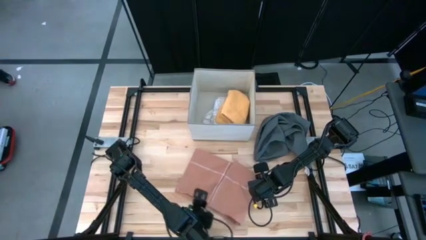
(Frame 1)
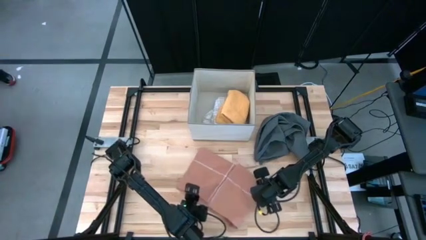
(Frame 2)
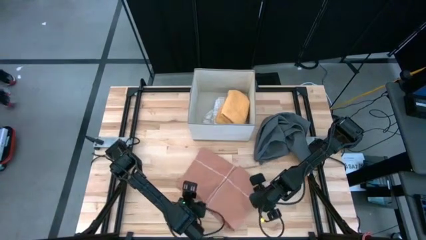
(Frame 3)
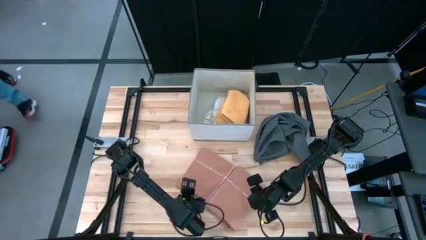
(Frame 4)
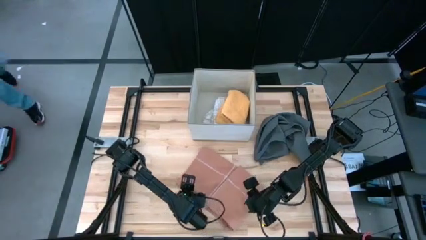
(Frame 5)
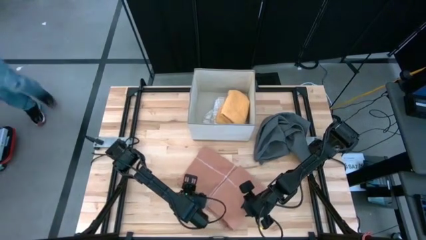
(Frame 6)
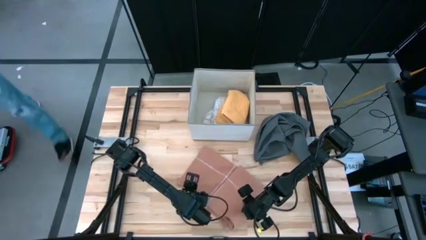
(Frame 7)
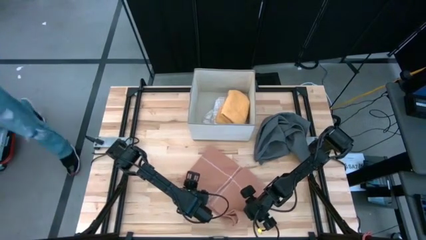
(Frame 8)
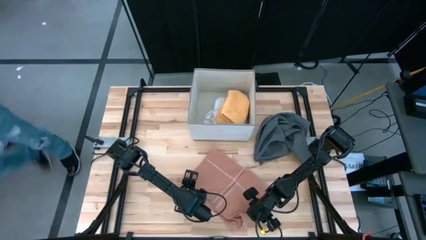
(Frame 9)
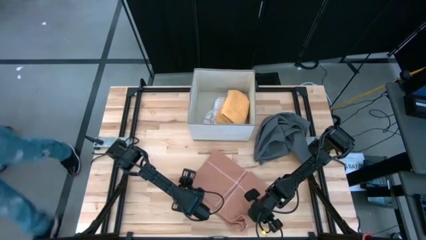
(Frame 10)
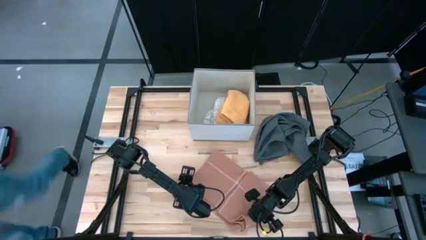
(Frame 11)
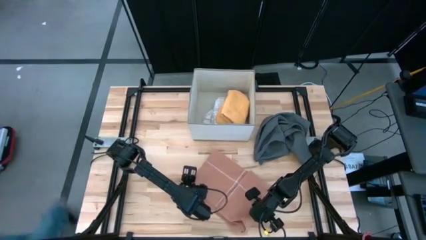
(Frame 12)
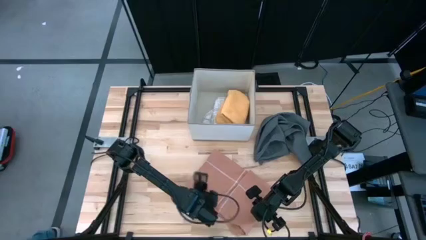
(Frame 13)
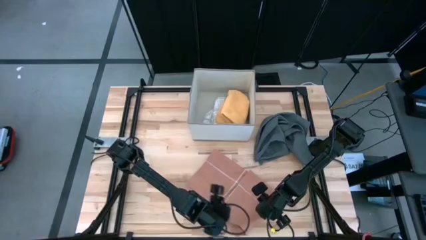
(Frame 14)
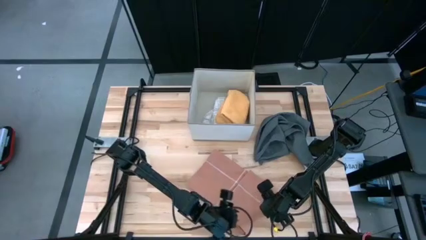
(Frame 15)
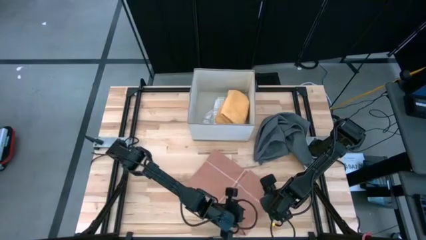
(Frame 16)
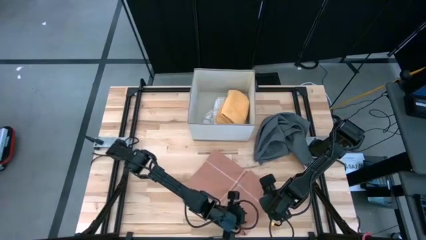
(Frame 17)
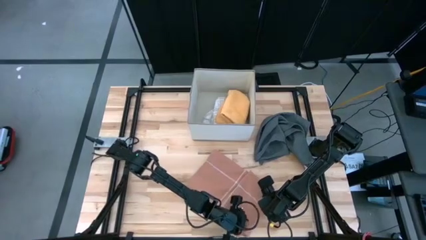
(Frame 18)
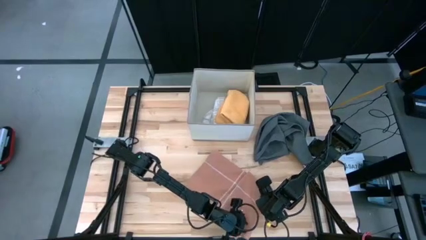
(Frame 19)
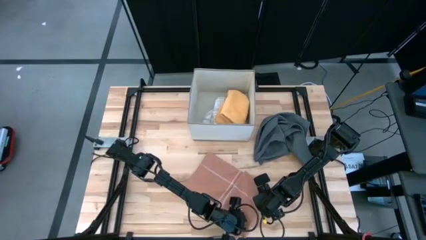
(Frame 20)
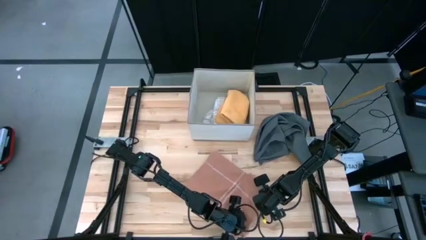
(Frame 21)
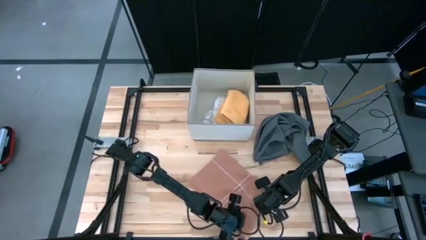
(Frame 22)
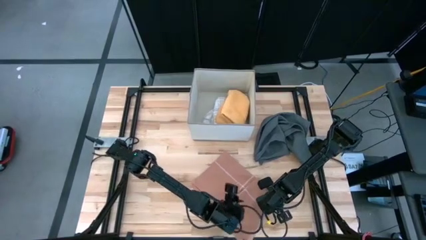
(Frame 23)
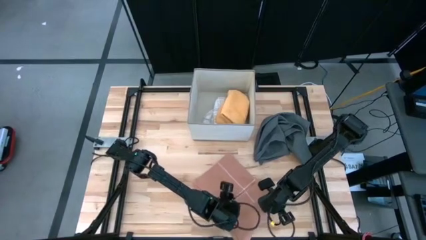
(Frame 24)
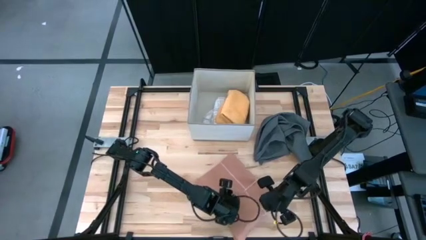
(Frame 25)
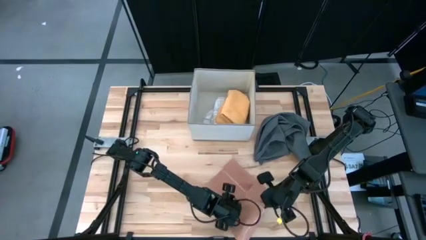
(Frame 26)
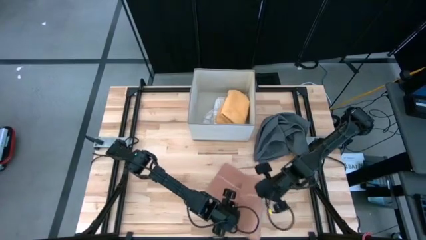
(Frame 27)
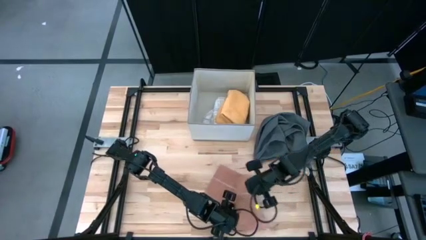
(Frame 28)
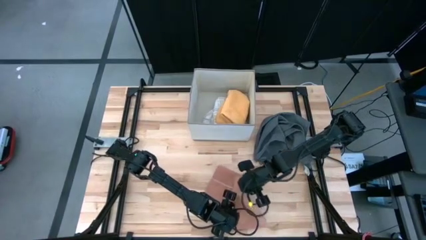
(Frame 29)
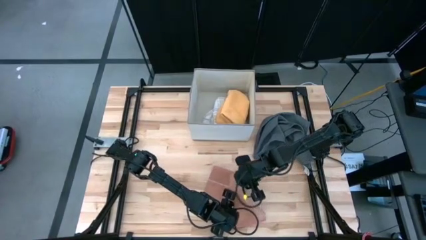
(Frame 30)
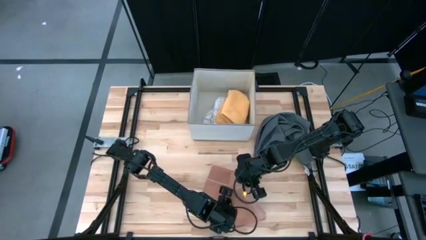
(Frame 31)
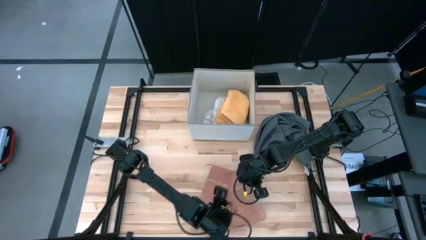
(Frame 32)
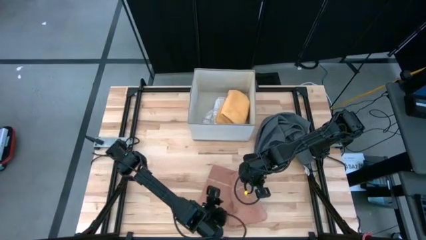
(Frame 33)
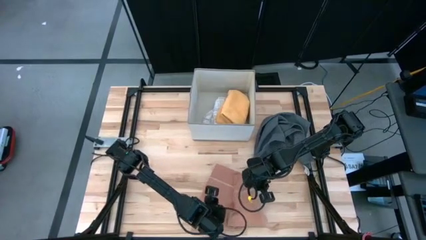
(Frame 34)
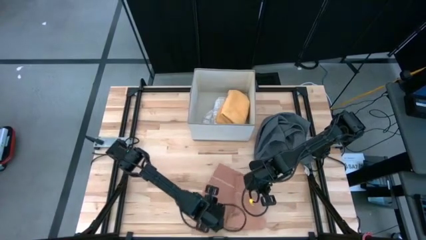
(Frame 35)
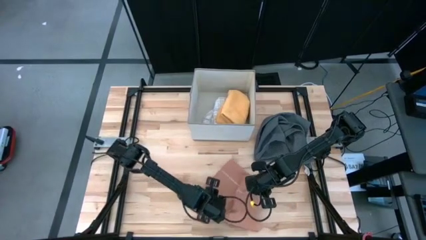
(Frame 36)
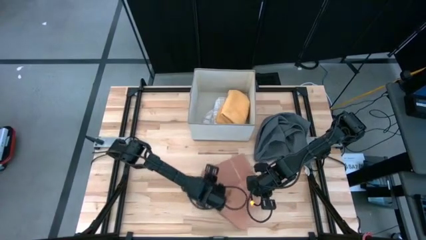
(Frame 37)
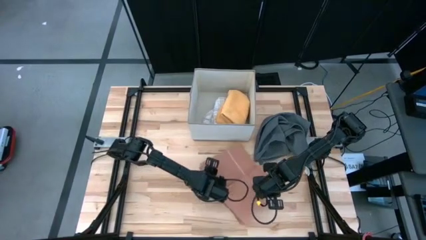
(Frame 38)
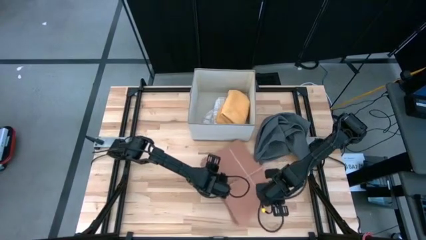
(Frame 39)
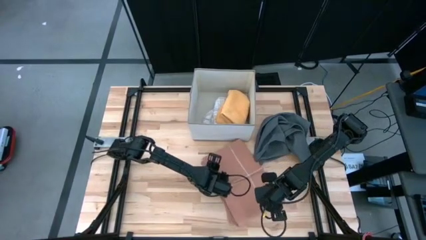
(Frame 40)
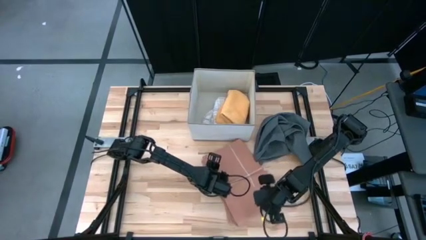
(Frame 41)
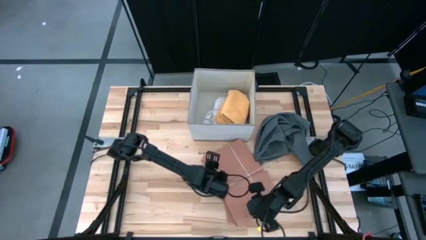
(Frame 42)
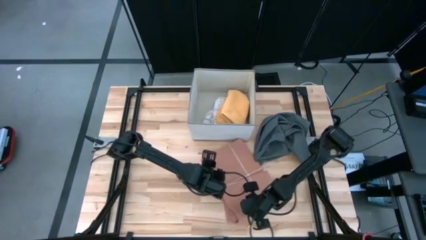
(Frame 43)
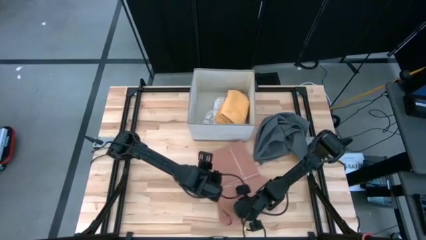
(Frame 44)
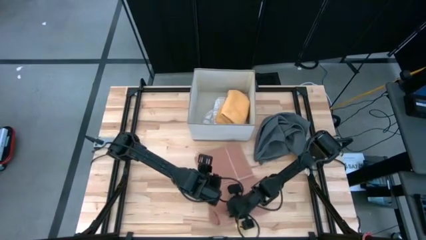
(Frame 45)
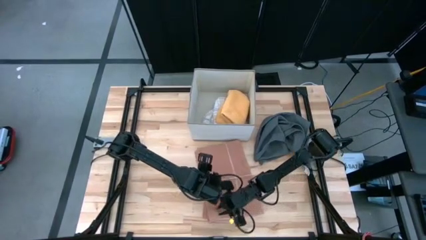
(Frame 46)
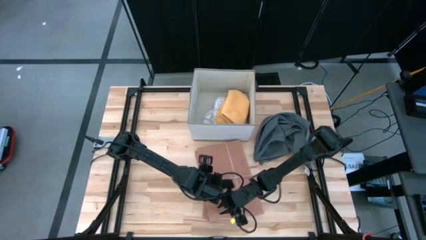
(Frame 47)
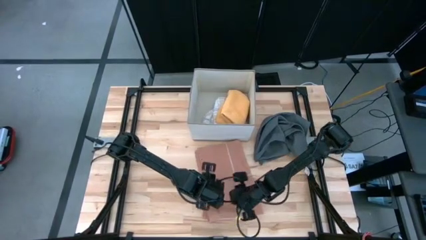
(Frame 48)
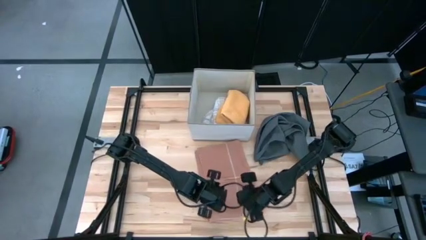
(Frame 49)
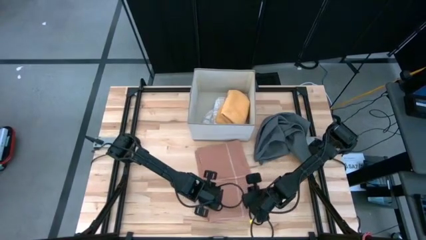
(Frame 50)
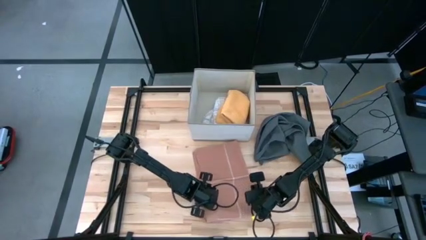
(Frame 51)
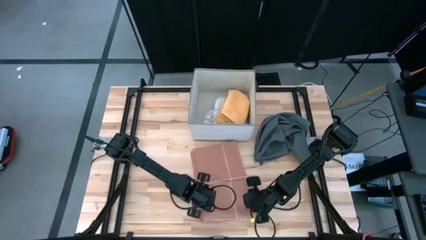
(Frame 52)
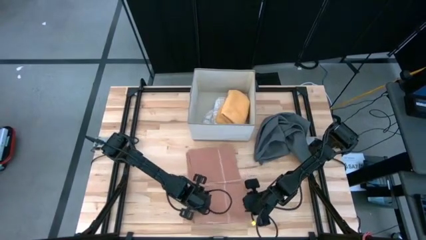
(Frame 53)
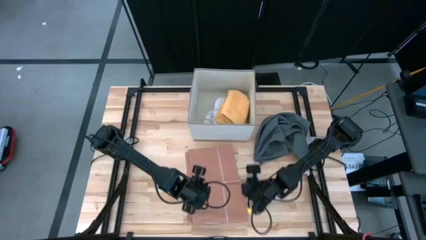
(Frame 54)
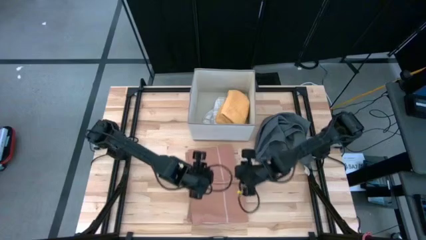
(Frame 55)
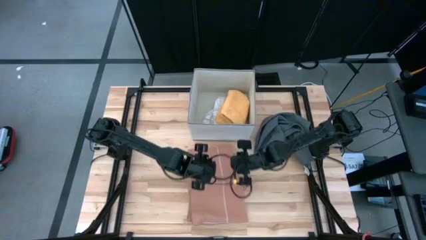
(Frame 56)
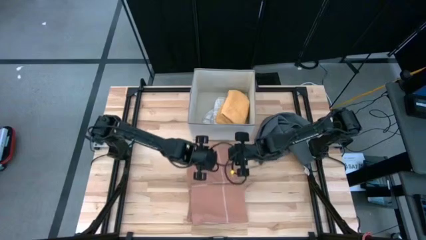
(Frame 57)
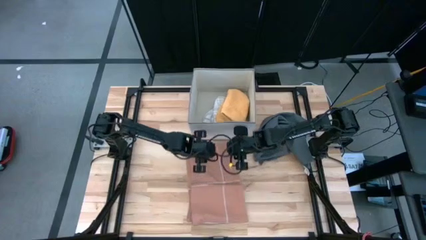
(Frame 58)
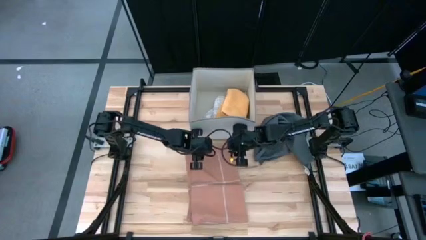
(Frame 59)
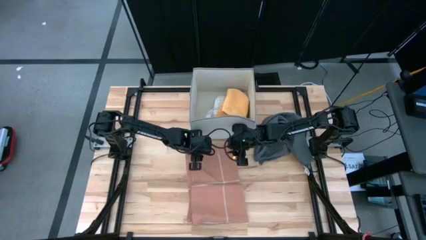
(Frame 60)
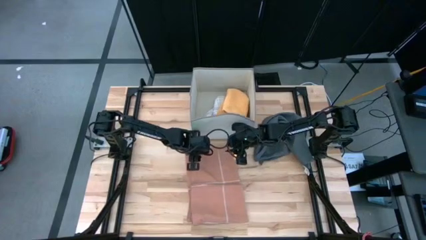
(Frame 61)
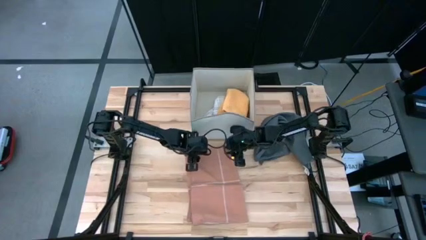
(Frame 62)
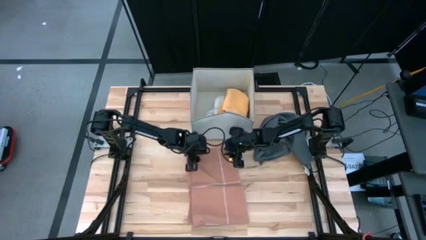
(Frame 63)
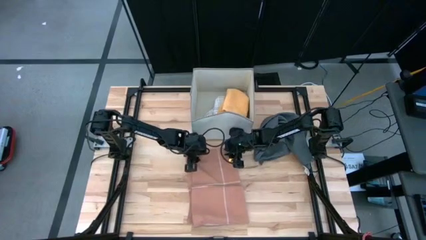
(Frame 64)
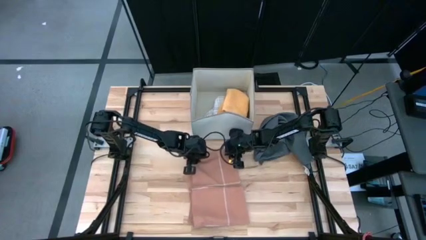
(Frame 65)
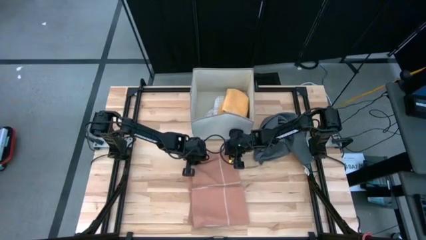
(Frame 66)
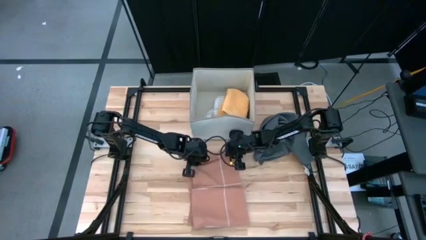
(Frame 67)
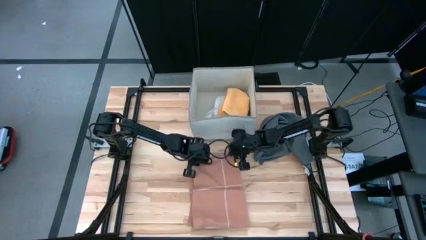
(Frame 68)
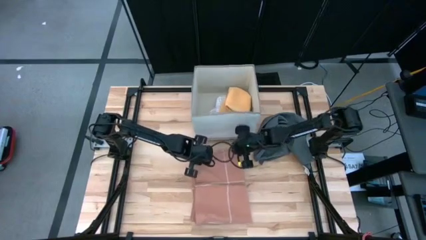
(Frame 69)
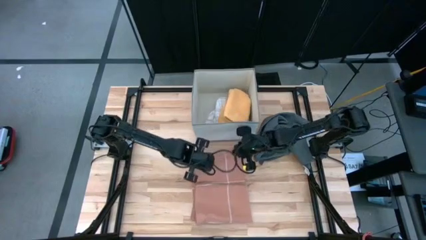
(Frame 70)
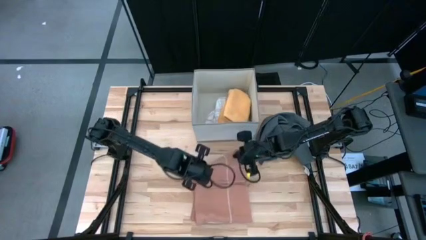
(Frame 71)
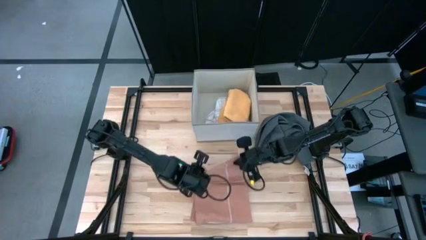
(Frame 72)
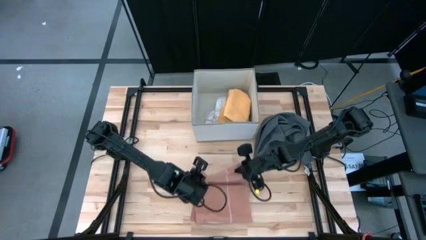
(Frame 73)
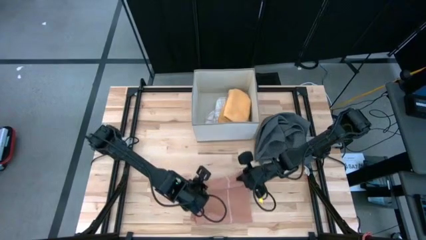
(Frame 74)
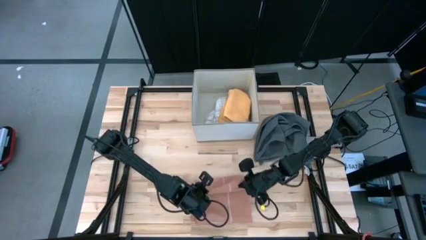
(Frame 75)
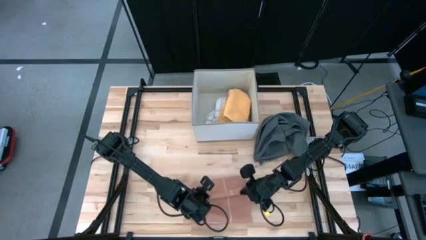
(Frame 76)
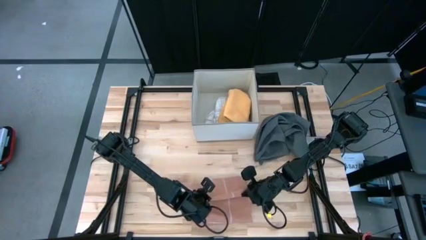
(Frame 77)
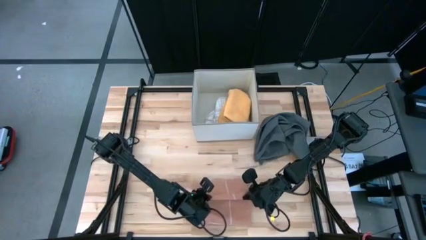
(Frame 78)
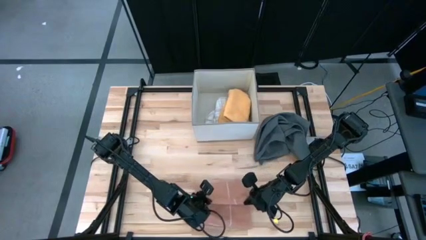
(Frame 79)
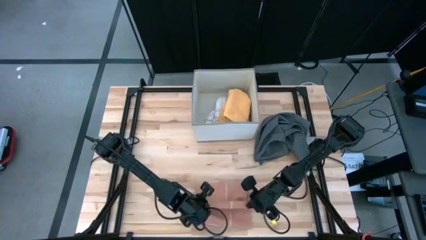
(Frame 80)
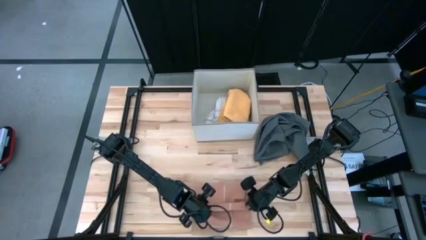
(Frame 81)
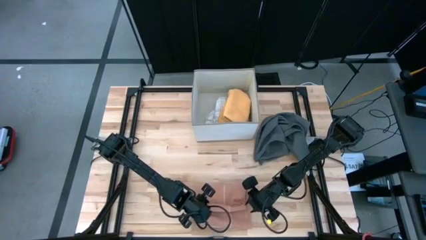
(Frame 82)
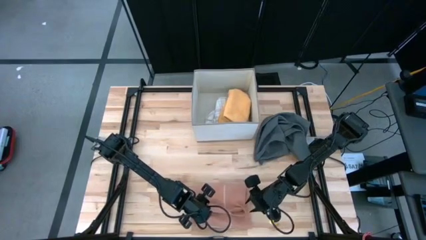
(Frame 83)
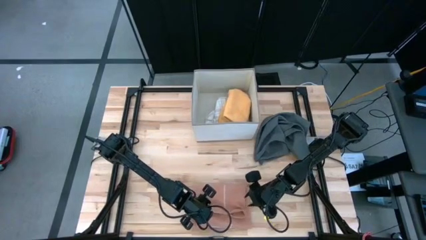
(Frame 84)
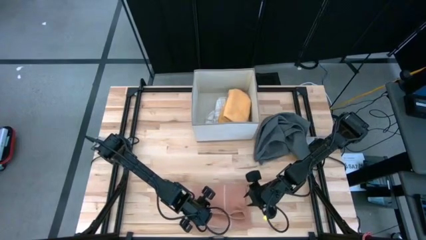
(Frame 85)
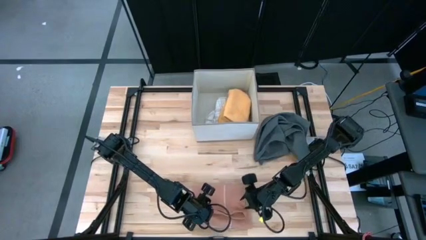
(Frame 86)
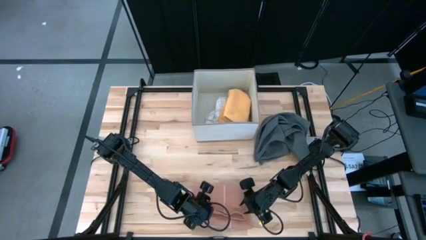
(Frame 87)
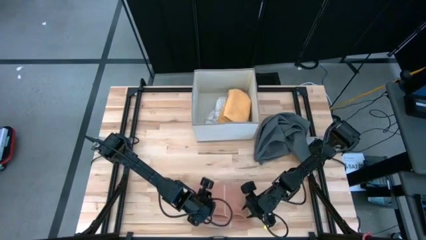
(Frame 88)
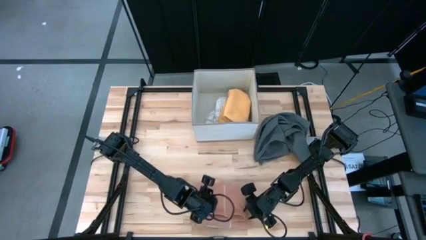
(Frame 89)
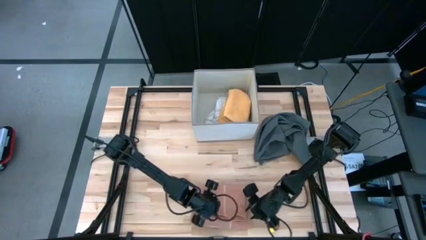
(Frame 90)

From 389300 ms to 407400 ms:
Task: Fold towel
Fold the light orange towel
